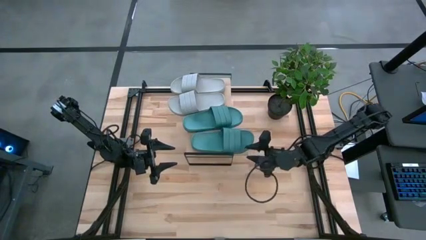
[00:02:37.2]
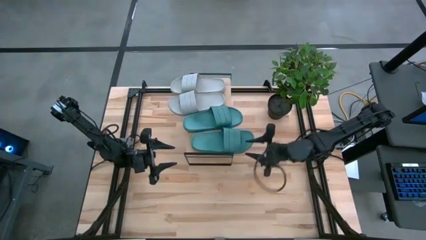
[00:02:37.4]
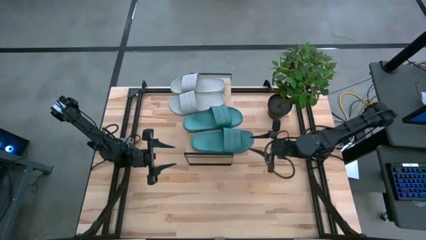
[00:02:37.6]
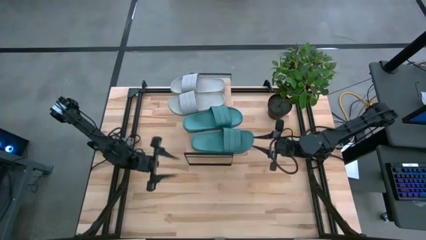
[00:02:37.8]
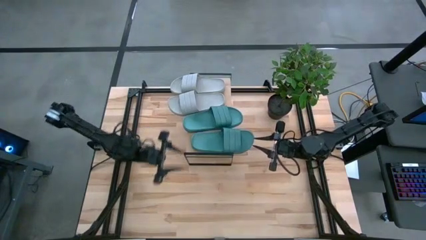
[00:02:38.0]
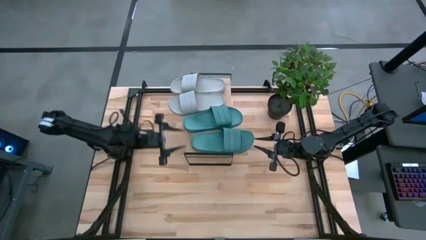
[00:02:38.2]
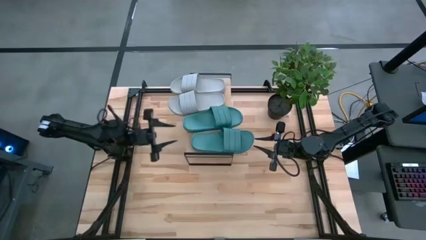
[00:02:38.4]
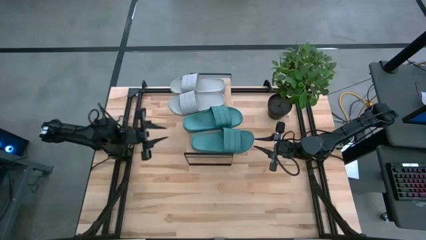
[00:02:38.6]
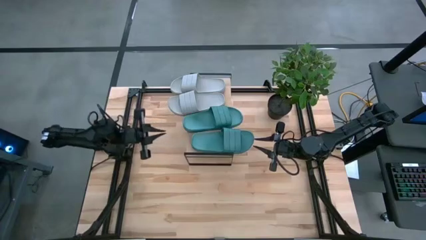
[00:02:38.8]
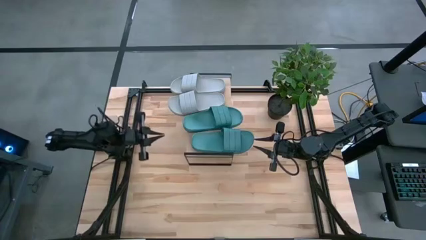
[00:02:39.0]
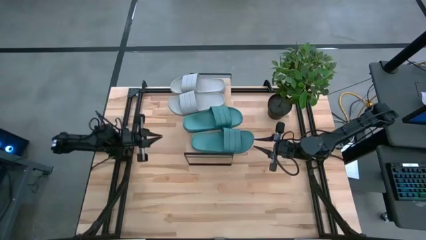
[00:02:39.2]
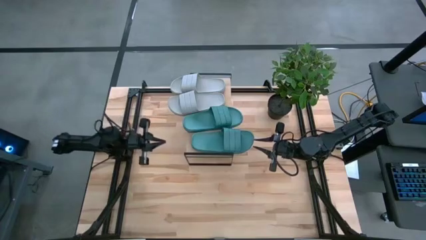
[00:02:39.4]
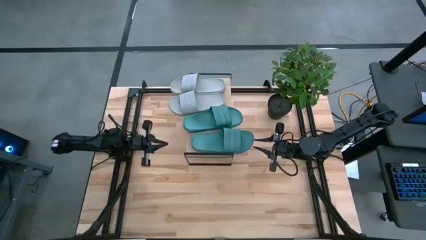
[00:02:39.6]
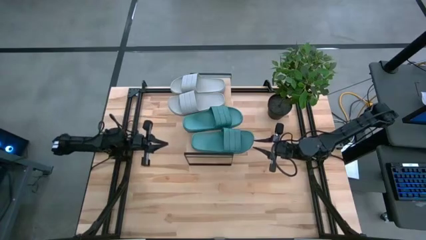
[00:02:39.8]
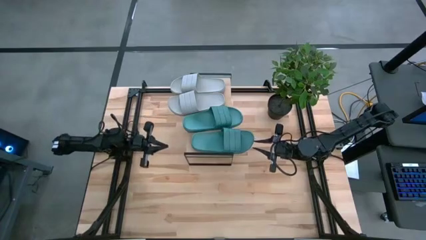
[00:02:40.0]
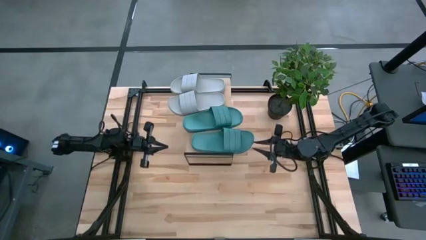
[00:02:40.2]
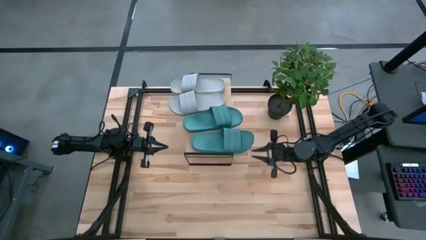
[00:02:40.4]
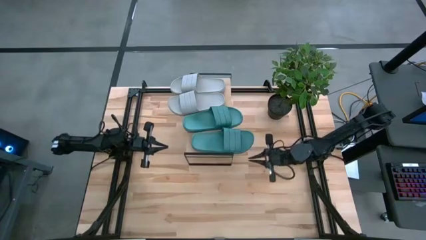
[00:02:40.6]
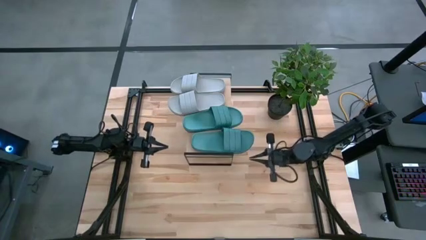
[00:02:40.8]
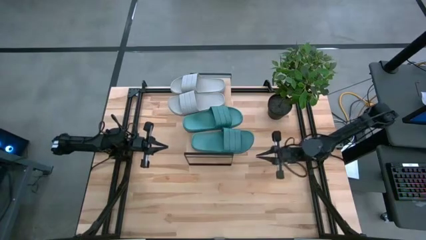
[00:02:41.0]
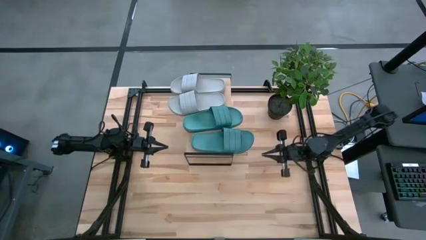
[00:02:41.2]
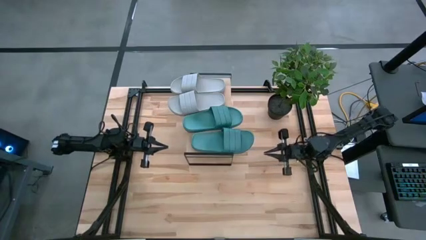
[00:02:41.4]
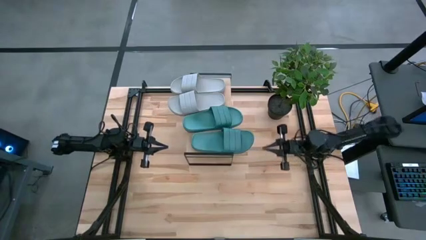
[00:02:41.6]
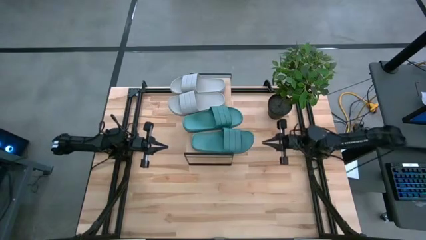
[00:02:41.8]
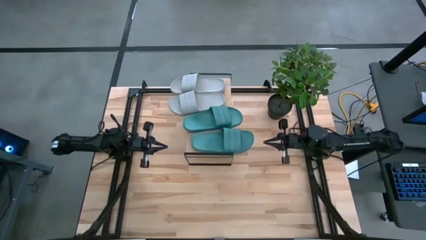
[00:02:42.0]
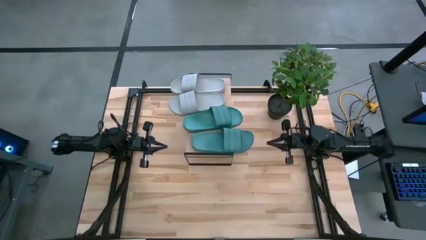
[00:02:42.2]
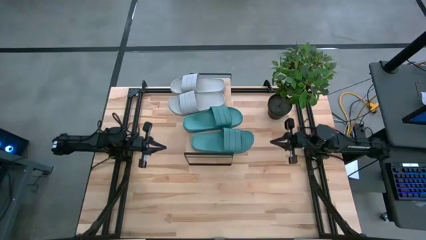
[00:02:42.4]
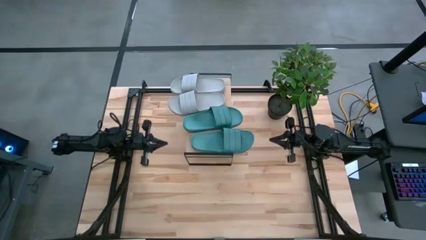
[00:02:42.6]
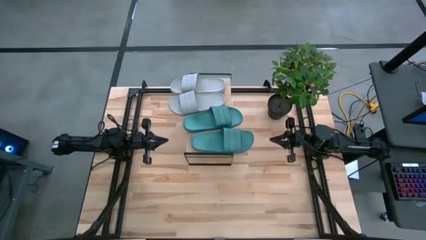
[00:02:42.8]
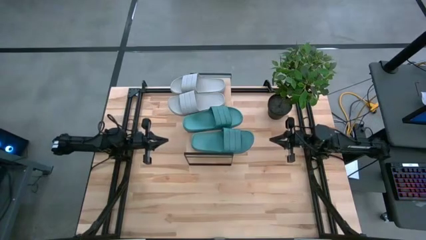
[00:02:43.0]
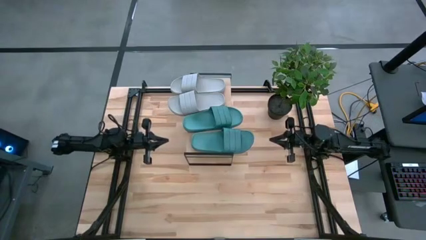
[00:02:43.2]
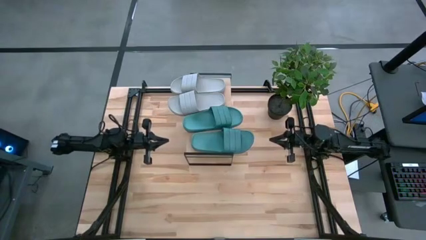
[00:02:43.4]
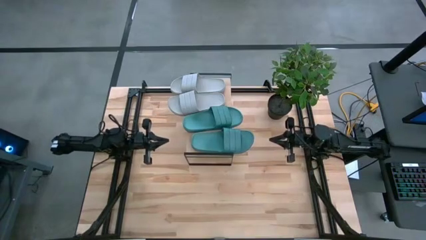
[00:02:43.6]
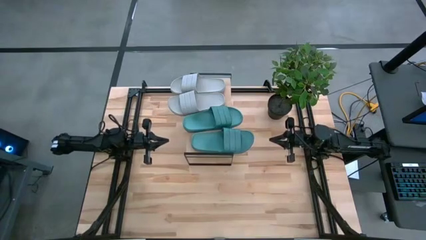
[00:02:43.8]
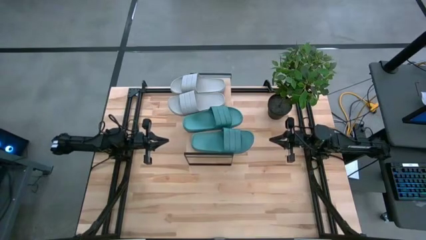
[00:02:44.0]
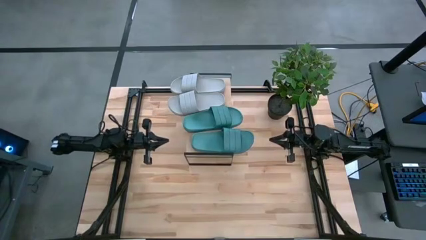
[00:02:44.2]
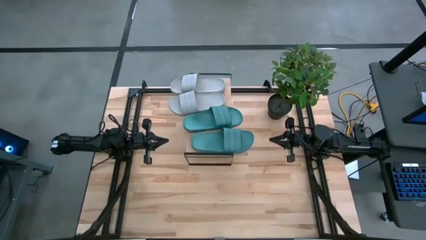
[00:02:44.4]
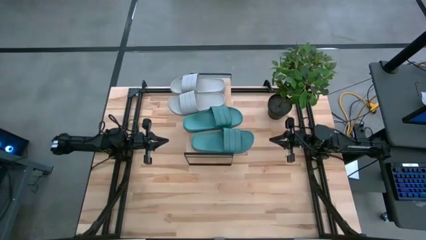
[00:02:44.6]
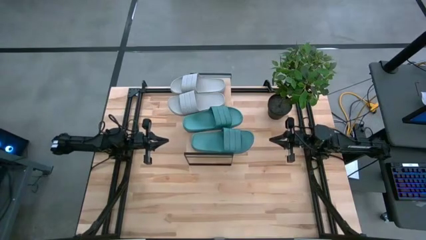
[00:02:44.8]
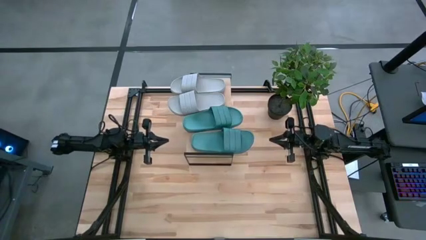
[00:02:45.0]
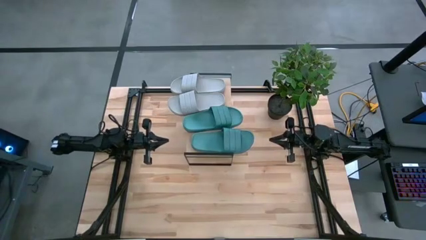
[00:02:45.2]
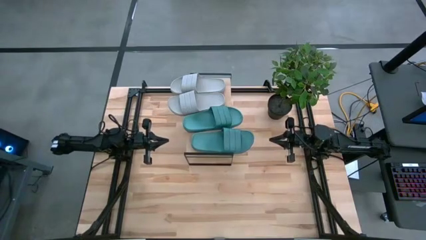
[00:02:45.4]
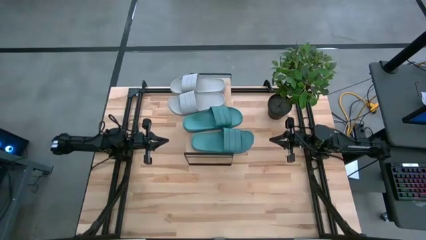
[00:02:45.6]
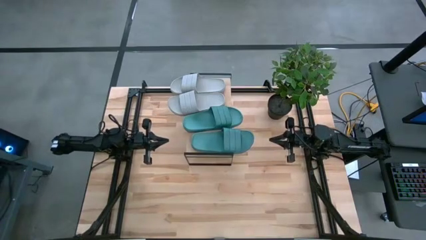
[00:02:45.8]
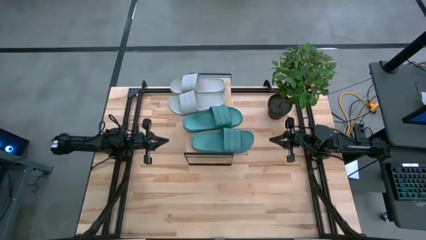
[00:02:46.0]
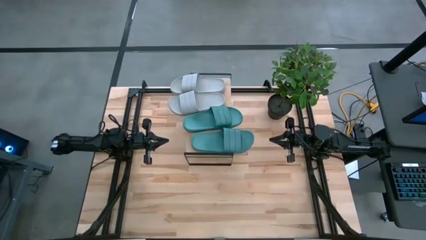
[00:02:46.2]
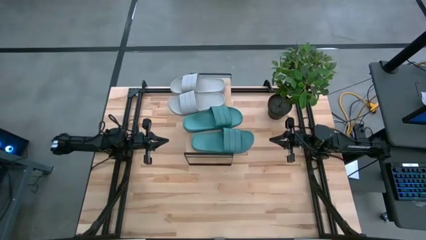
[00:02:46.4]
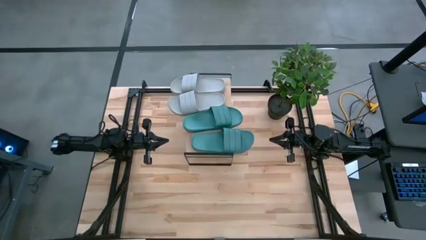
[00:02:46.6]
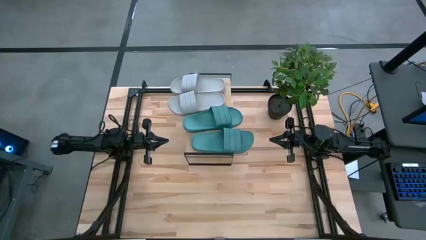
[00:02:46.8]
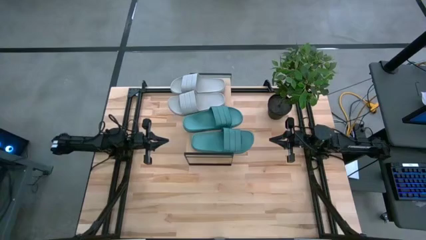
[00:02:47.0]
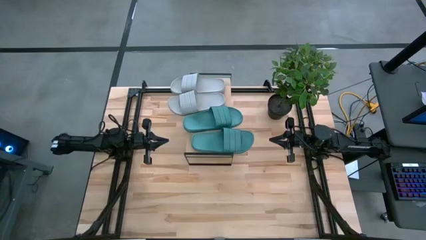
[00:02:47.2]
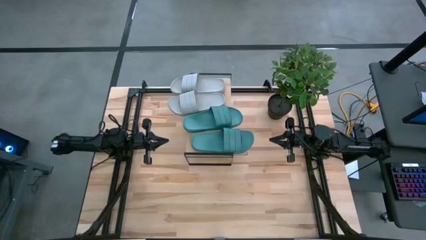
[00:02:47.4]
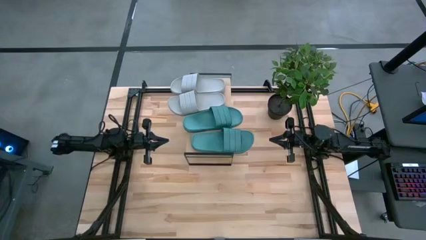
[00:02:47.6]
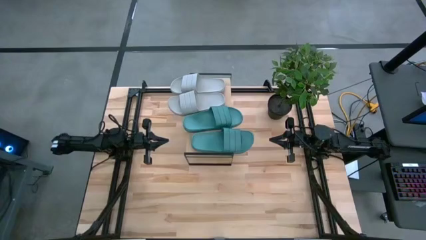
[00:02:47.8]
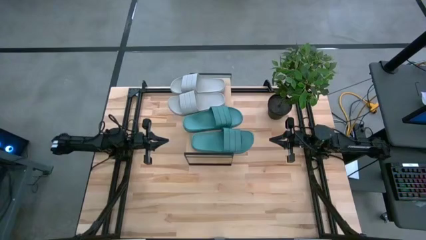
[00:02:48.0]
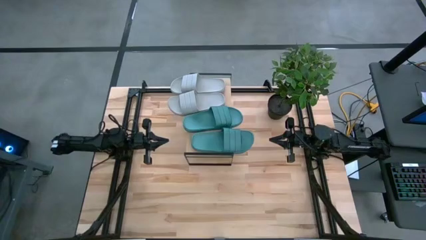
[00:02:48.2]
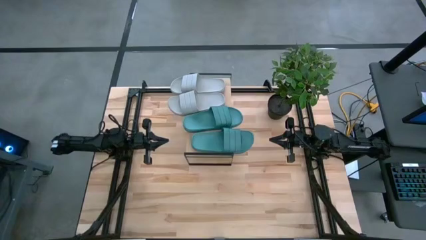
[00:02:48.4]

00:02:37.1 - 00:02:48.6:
Task: Pick and place slides into the shelf
Return to Home Position

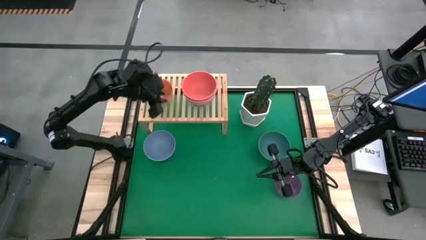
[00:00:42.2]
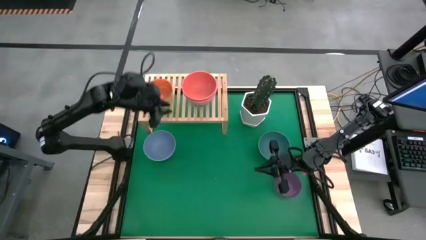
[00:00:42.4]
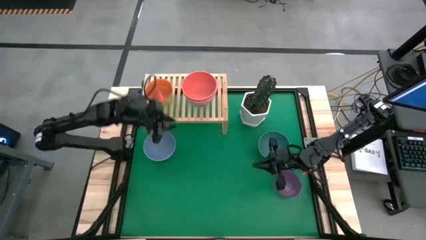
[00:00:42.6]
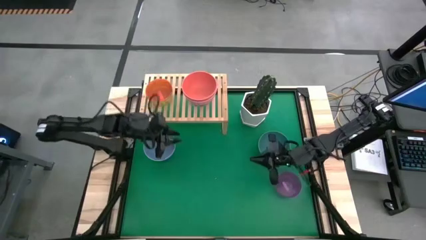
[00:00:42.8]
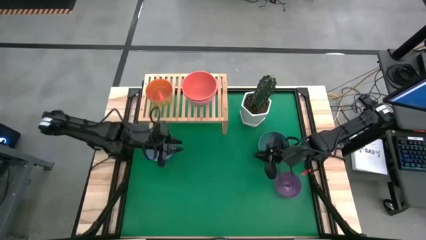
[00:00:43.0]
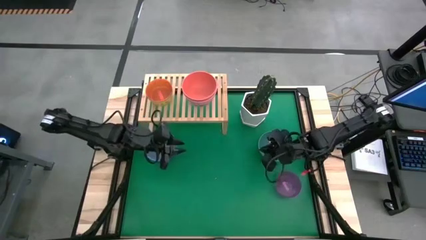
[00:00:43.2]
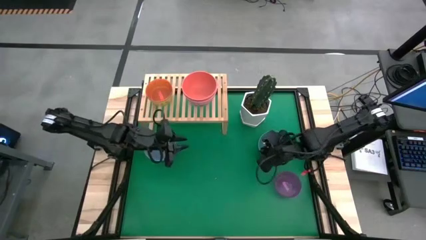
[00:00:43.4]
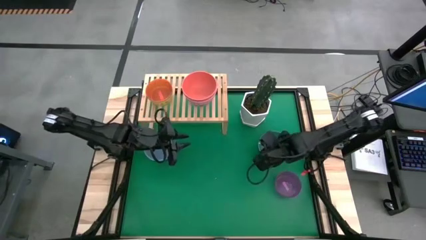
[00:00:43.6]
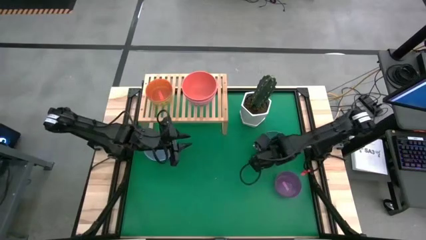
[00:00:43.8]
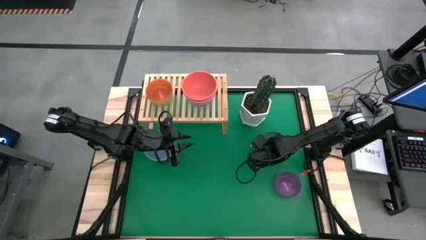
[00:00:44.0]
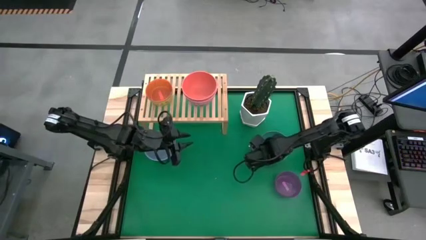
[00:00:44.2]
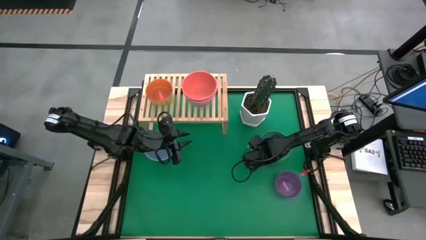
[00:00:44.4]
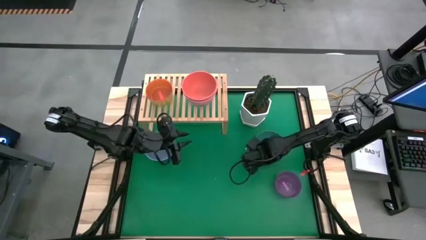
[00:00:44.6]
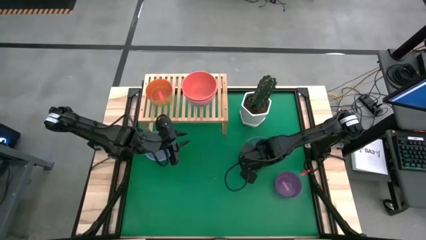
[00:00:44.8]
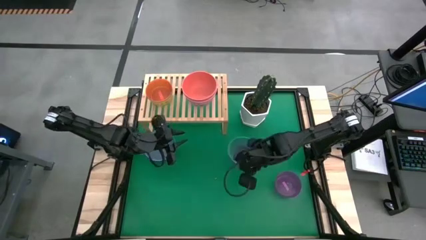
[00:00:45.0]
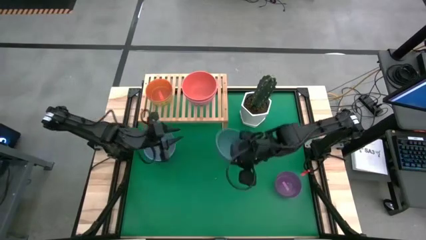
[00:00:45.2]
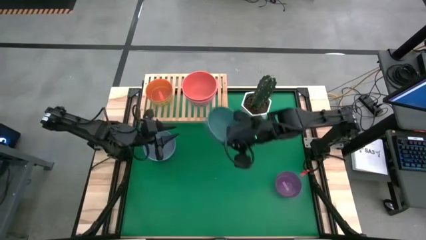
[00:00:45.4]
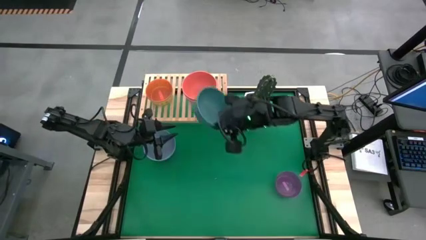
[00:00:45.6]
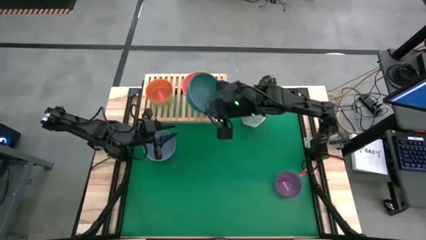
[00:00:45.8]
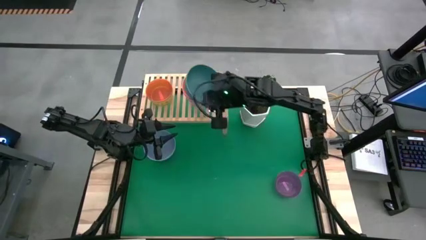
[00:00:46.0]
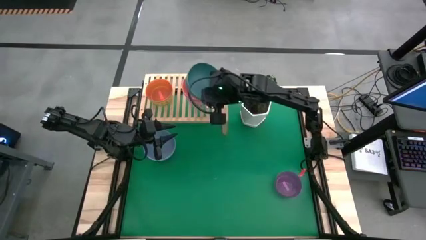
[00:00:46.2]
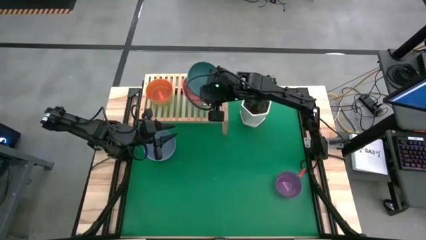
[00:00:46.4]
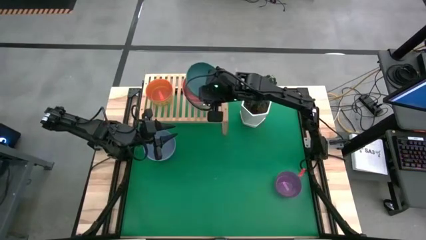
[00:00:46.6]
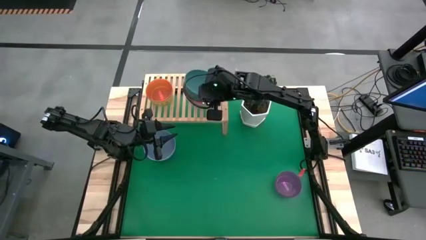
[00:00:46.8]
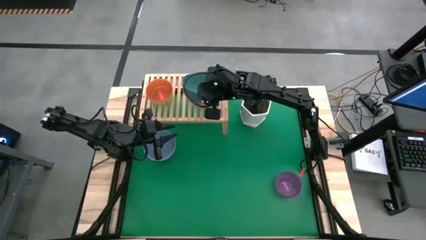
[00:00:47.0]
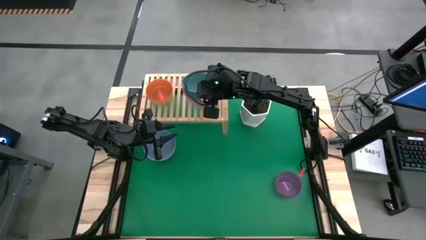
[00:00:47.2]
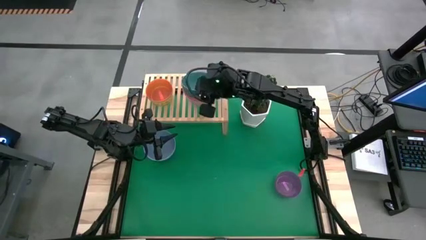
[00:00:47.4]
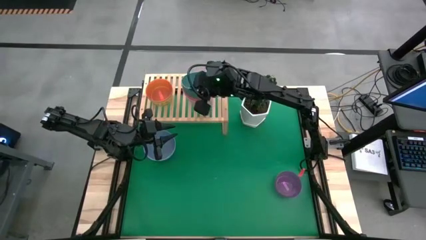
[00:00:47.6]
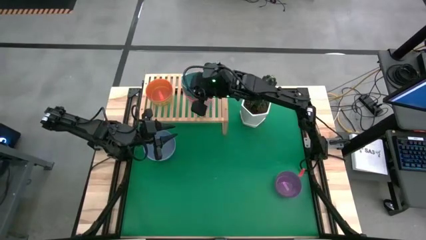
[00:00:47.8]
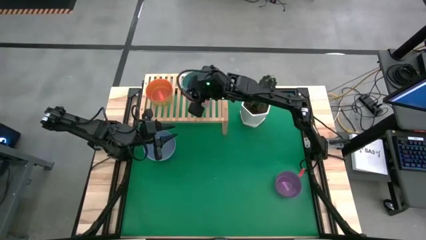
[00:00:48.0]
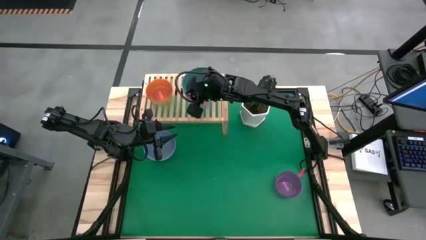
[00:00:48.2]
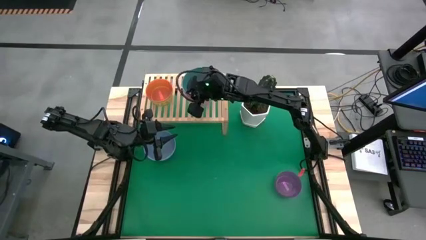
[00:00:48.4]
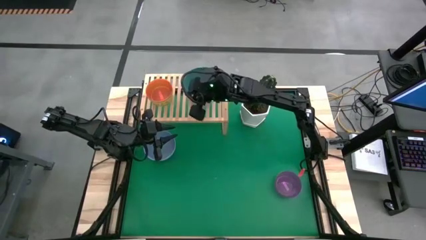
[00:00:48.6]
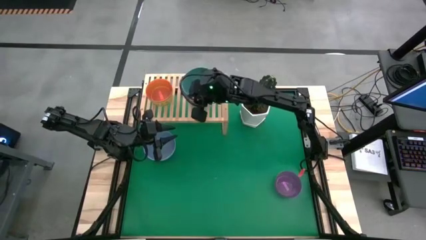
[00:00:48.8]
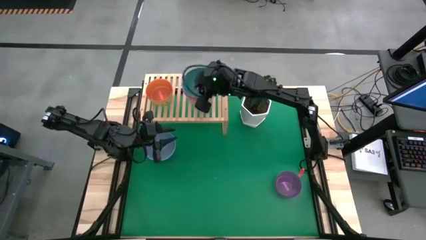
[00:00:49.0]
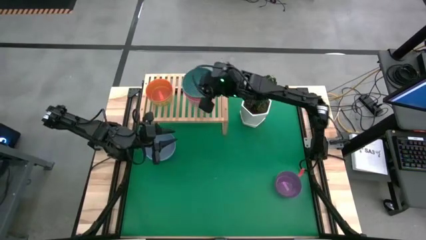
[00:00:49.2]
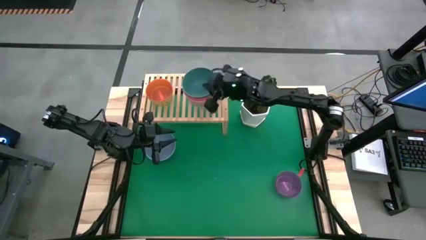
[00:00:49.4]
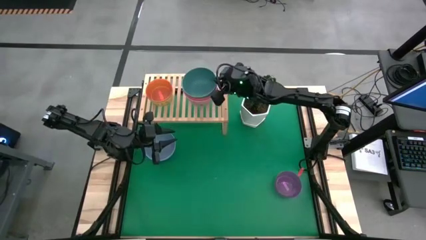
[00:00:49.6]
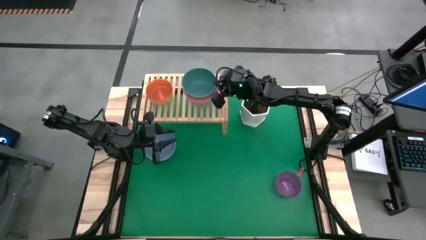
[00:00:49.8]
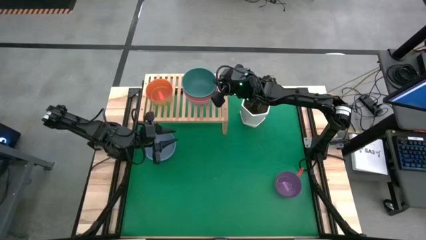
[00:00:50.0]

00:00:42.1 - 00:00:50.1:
Task: Place and stack bowls onto a shelf
Stack the dark green bowl on top of the orange bowl on the shelf
